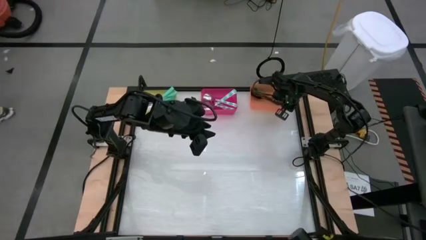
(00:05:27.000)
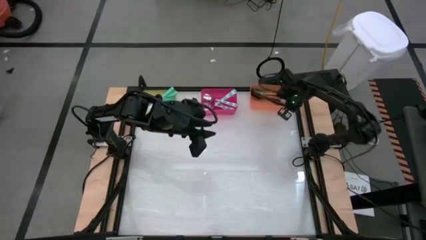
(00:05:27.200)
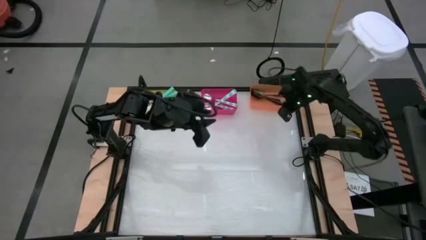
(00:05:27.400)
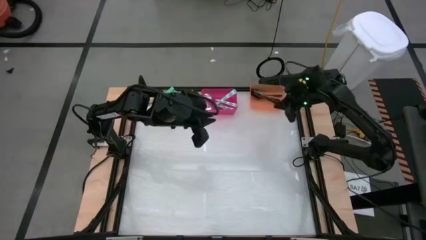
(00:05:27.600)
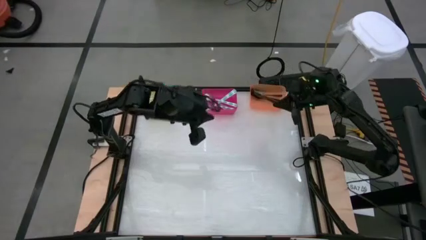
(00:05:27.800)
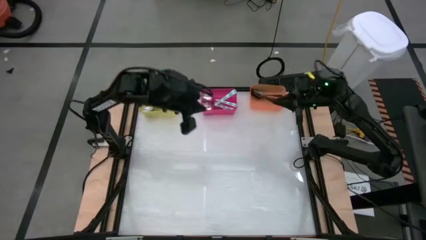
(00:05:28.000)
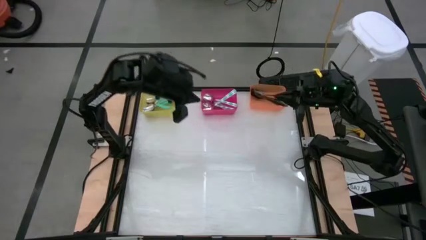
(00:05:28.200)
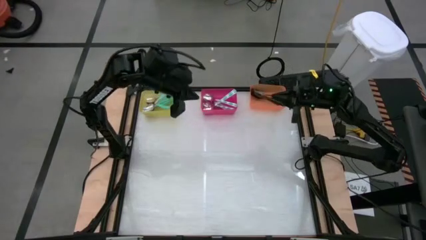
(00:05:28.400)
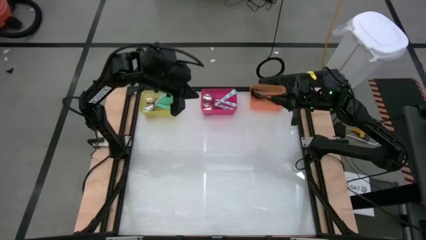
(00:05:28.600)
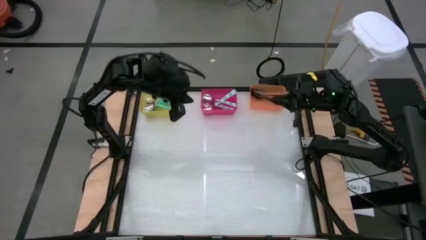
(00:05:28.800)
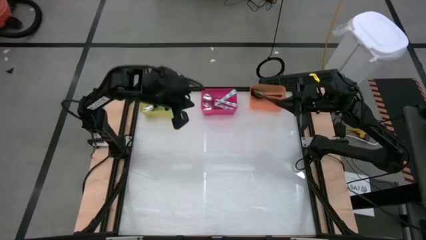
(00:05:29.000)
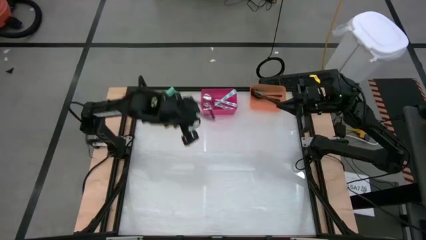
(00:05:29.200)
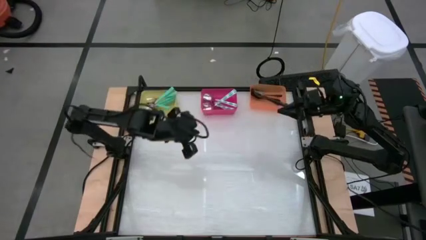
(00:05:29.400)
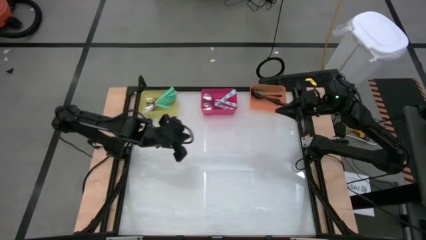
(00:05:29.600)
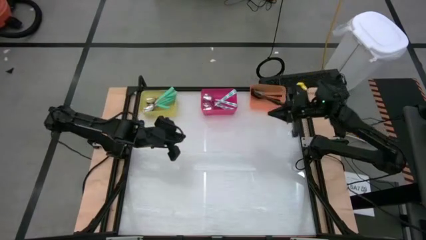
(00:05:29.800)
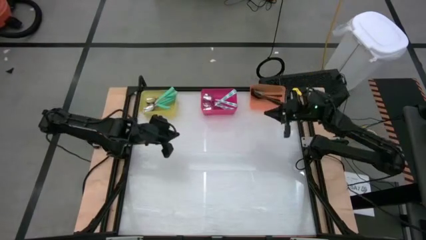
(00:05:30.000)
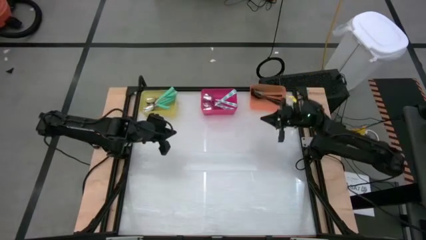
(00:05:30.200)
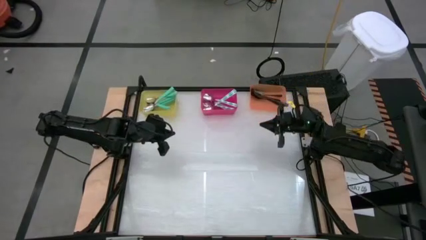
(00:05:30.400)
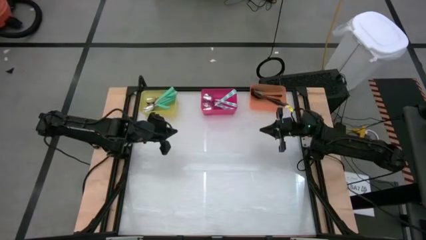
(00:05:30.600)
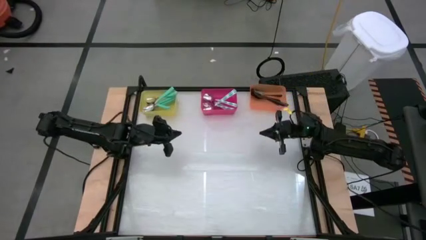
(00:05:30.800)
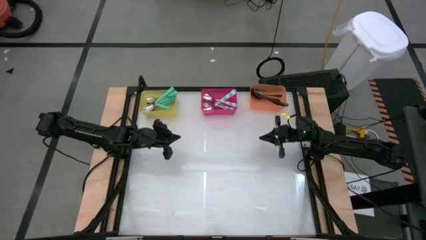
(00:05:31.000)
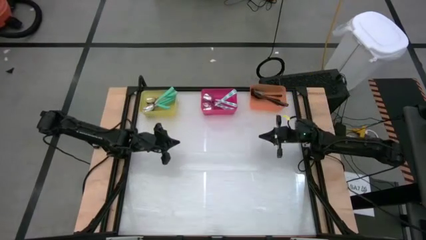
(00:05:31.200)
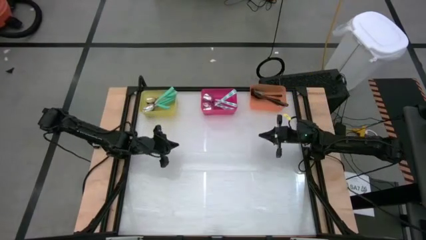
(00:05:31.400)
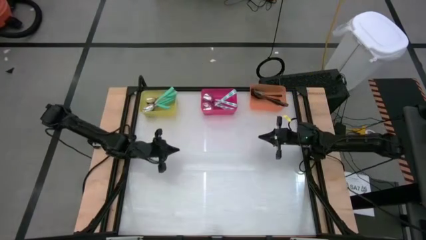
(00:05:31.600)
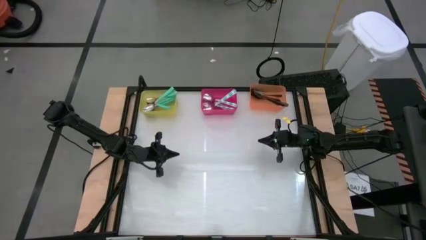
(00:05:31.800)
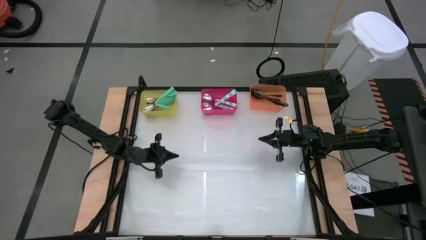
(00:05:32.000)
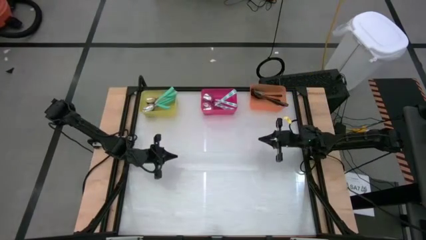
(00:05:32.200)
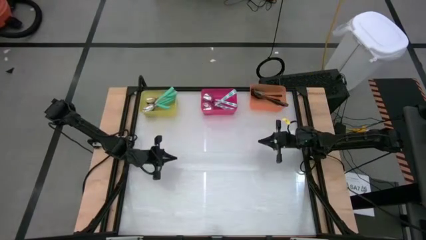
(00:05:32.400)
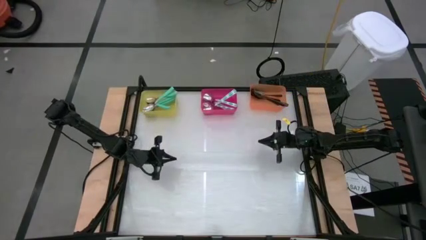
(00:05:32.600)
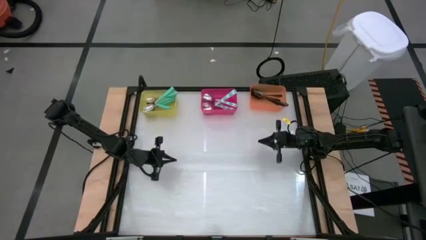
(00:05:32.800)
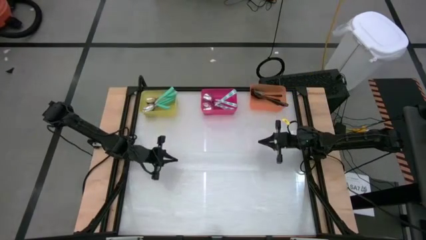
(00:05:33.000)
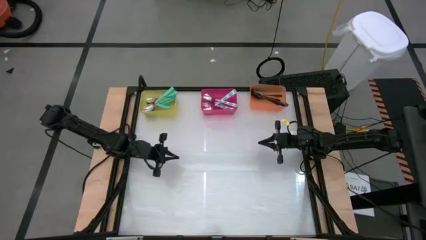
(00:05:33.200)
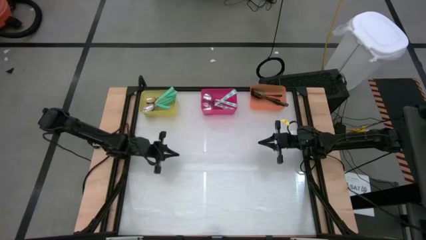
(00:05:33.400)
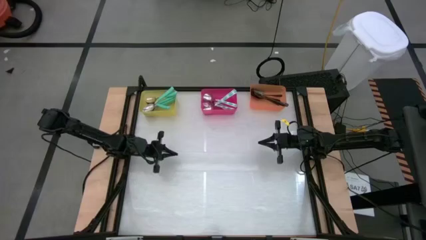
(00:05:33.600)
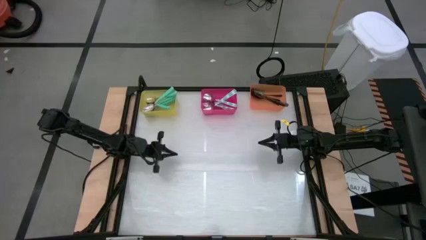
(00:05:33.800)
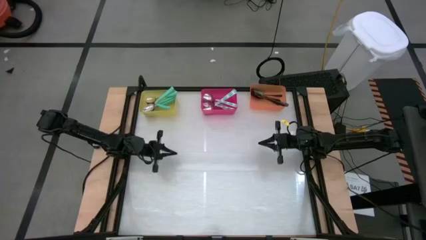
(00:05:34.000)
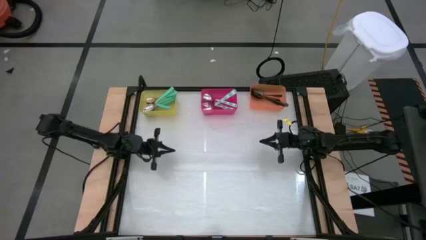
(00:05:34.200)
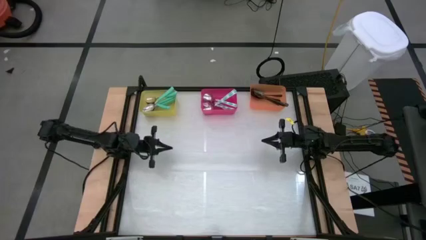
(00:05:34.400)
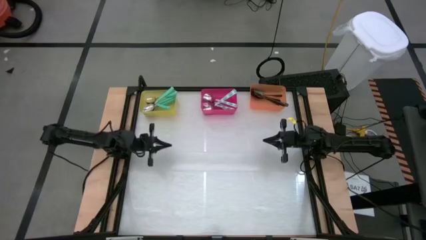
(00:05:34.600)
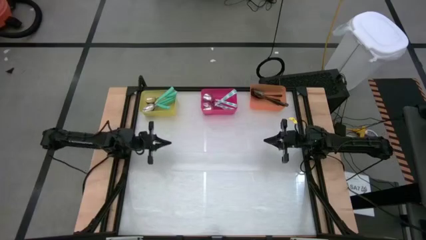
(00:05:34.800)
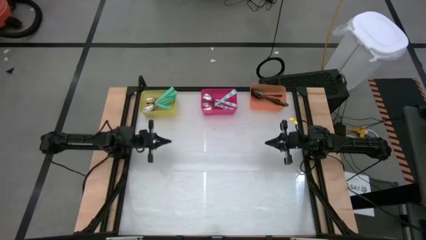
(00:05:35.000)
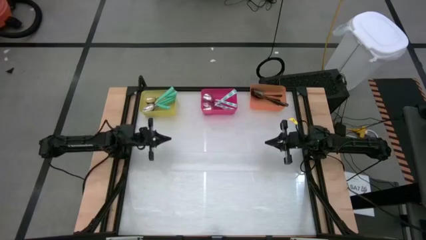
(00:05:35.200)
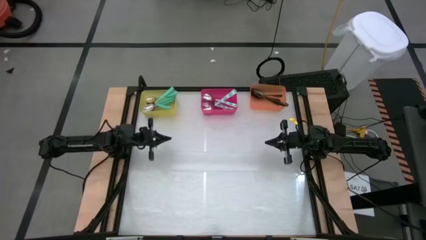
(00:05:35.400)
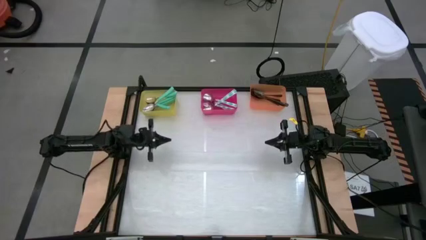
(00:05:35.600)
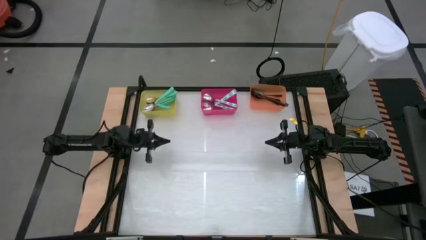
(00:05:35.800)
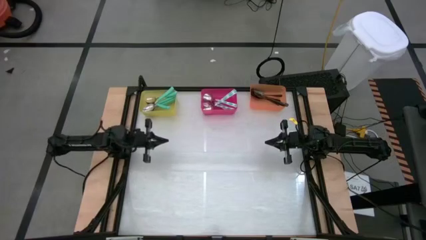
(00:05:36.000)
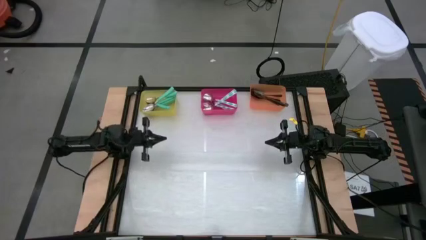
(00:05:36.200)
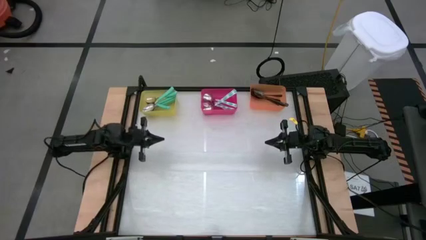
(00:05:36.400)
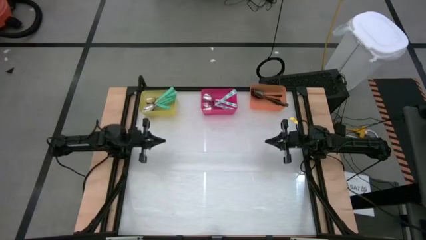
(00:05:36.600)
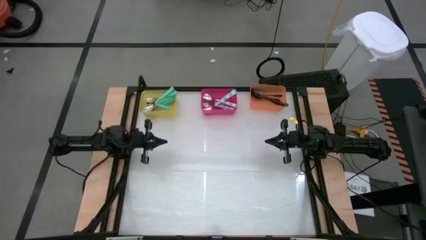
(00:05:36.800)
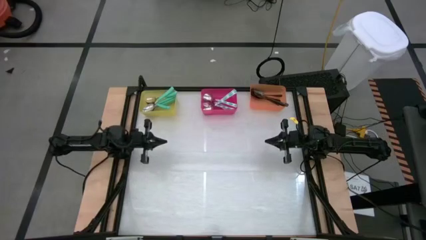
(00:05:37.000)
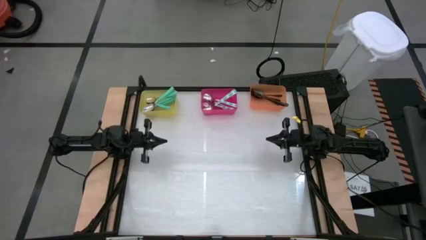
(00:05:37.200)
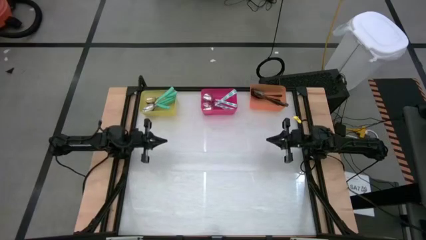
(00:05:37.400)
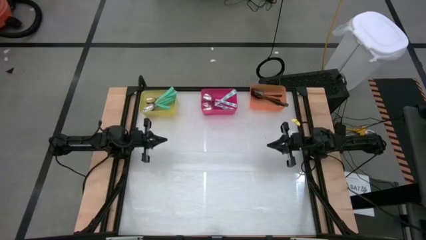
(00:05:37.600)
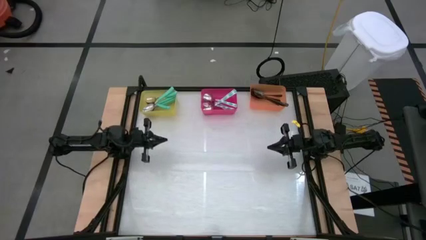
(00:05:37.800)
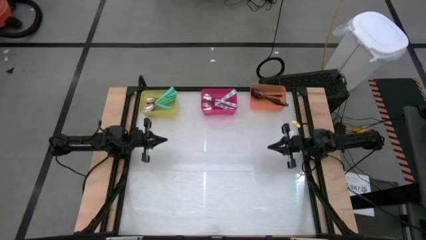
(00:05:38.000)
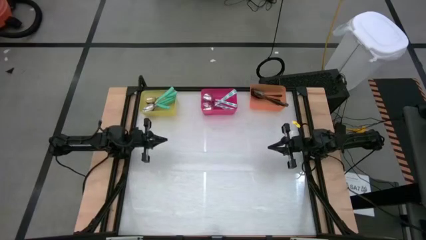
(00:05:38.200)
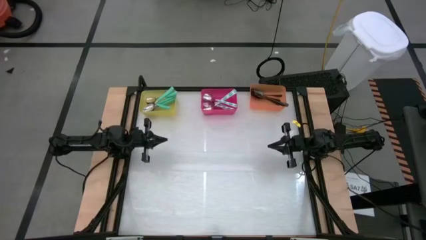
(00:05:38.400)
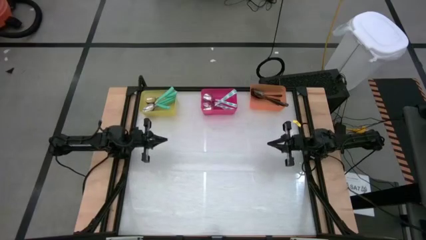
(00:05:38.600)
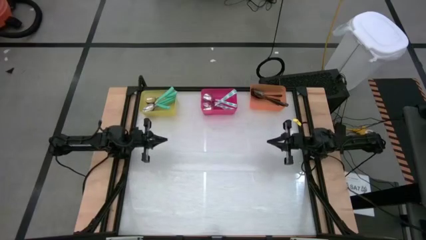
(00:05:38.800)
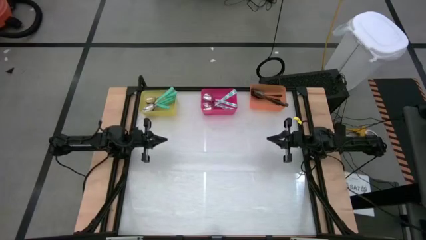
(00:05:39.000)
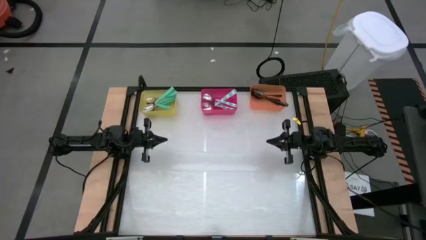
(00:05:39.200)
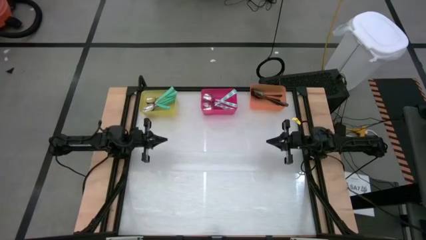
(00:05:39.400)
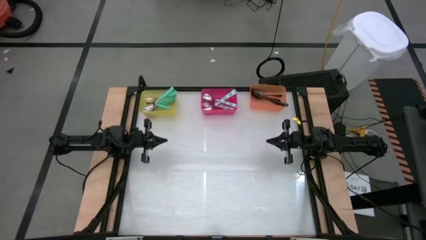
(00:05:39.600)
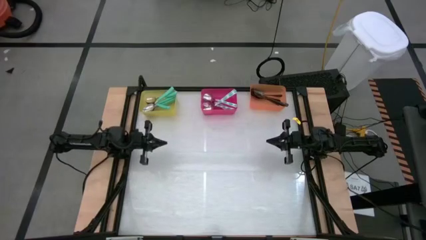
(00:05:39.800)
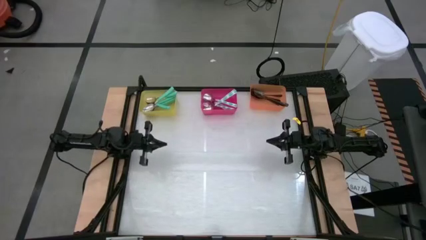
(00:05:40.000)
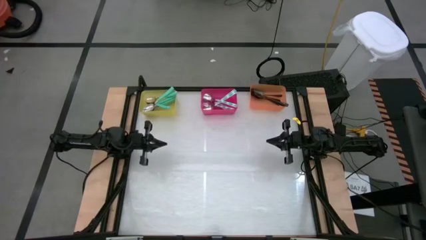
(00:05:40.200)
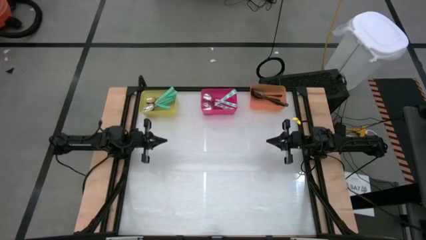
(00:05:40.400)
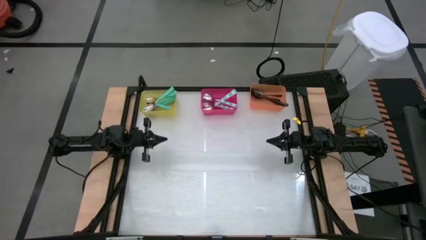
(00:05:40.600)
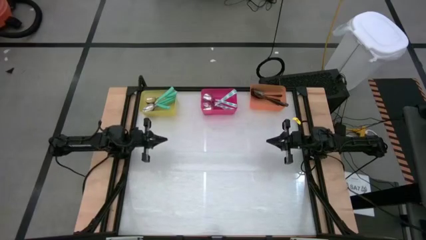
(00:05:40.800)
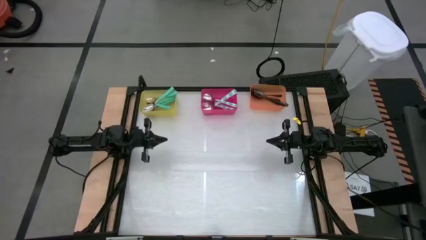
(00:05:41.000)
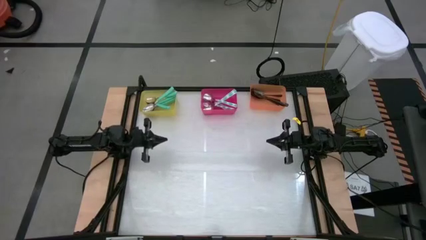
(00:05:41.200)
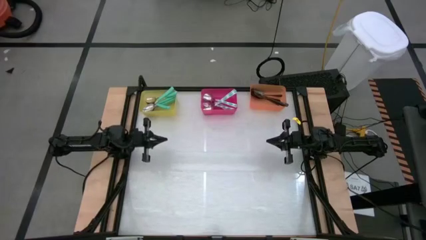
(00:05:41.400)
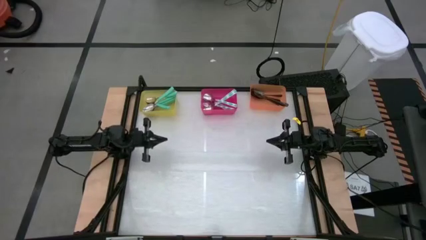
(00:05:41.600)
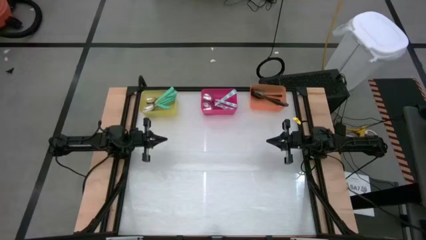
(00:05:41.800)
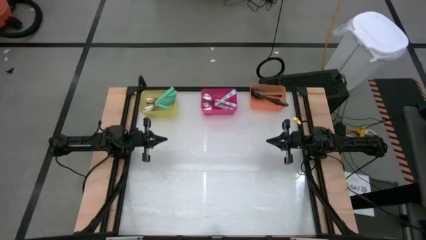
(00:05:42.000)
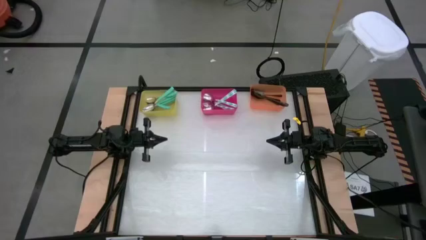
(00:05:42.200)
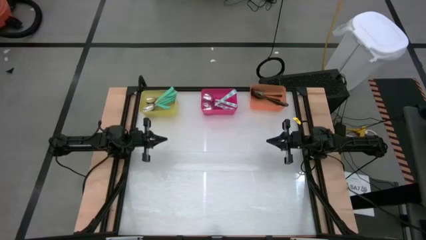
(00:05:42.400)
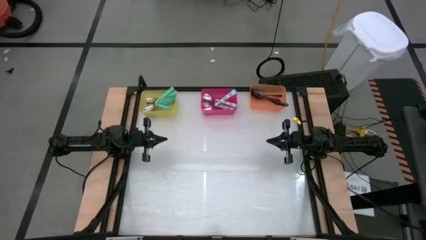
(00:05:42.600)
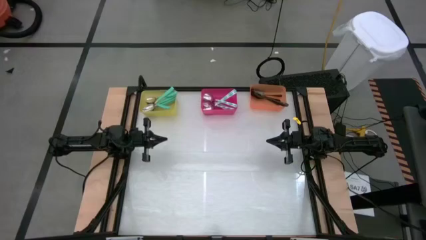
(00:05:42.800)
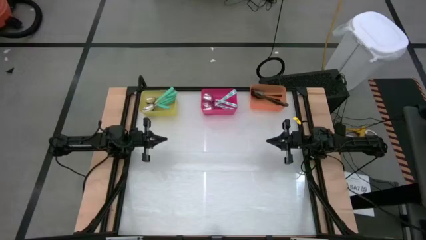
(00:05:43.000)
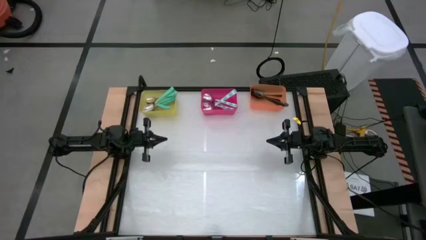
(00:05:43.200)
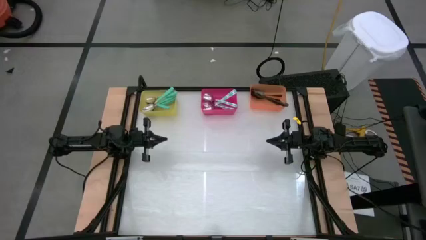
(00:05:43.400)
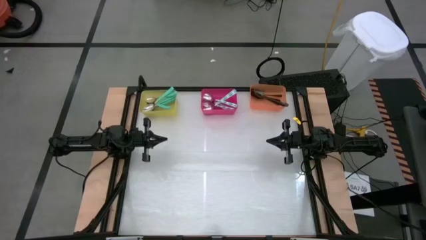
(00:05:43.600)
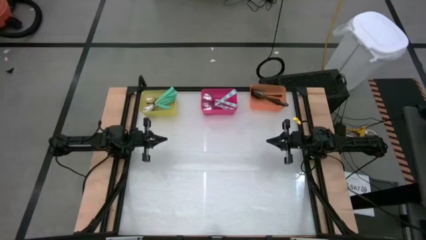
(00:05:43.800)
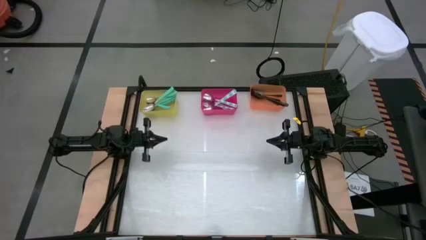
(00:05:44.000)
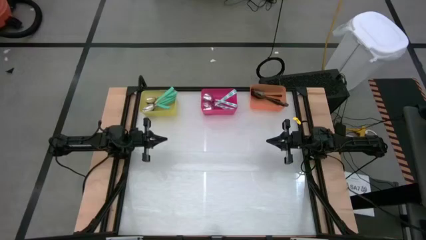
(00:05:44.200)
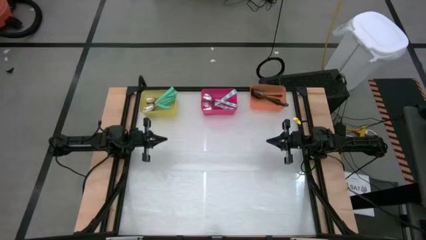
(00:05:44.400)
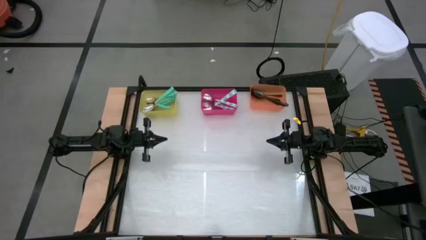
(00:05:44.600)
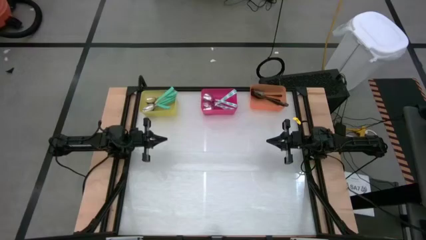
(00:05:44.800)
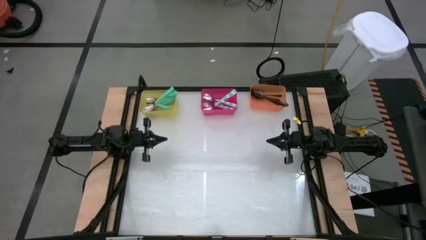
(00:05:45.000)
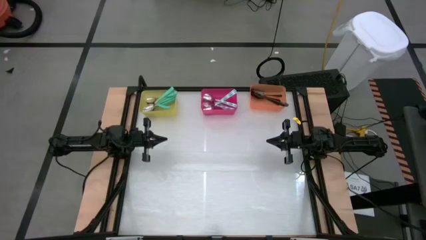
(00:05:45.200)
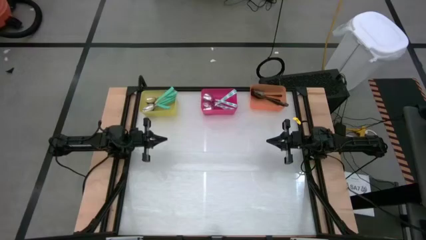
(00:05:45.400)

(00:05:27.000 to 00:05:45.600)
Task: Sort silverware by color (type)
Return to Home Position
